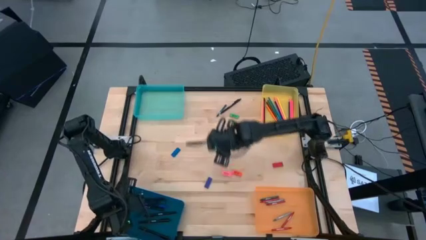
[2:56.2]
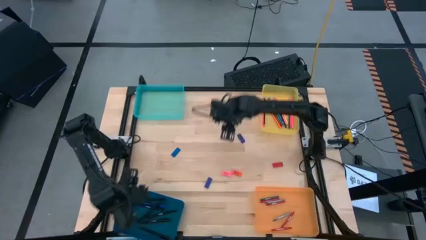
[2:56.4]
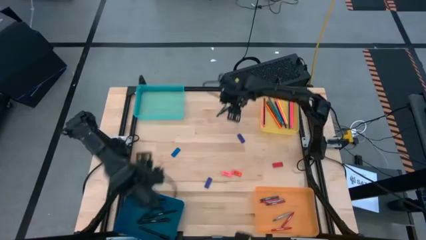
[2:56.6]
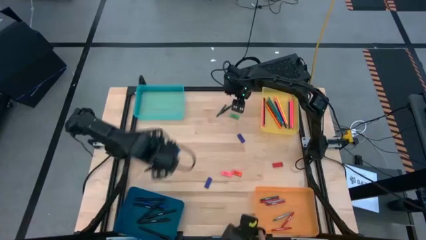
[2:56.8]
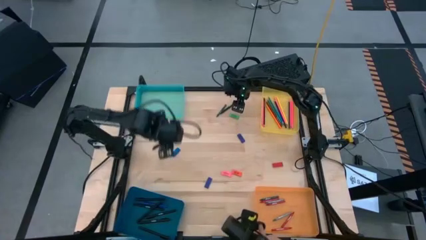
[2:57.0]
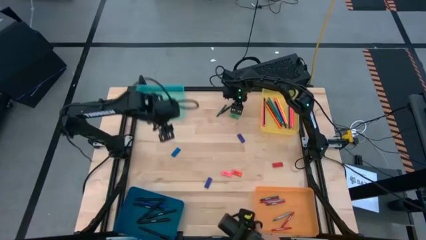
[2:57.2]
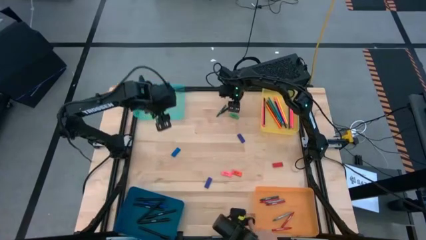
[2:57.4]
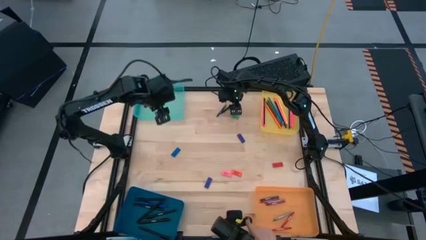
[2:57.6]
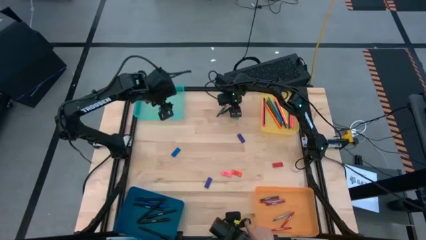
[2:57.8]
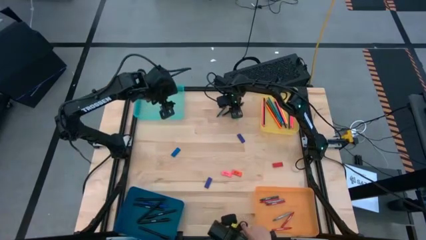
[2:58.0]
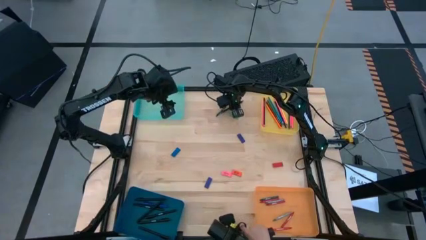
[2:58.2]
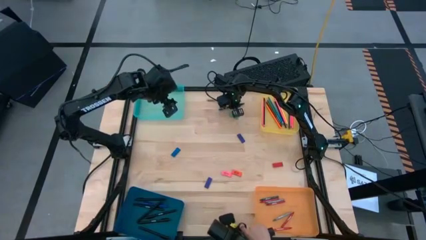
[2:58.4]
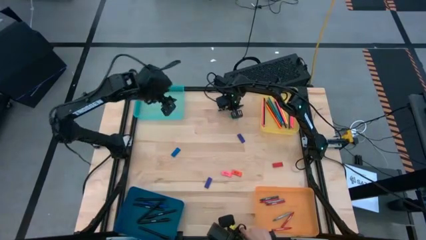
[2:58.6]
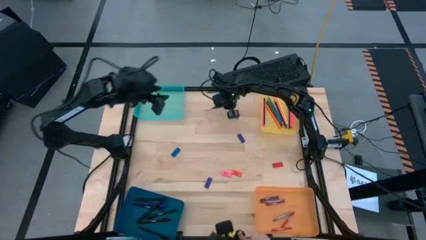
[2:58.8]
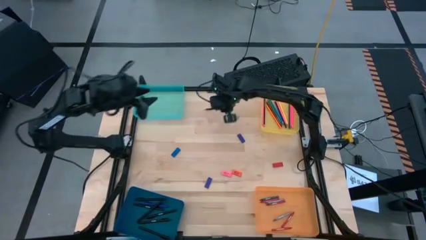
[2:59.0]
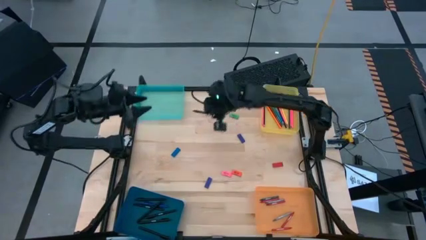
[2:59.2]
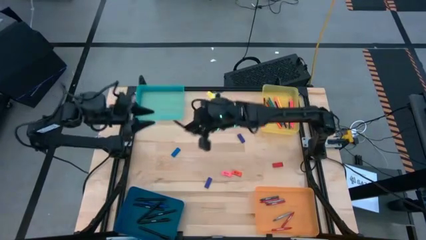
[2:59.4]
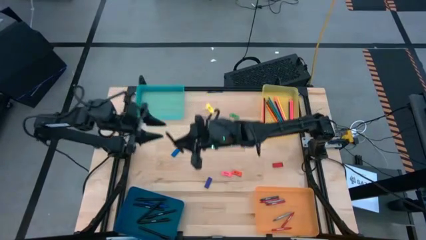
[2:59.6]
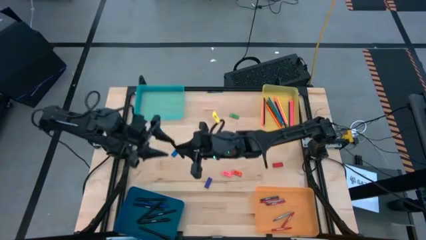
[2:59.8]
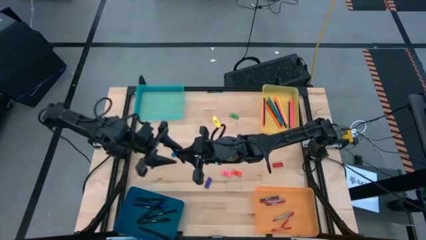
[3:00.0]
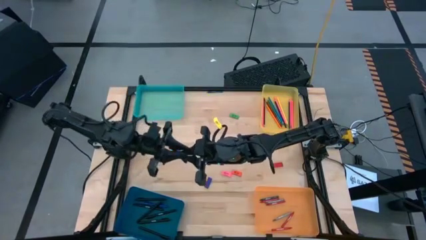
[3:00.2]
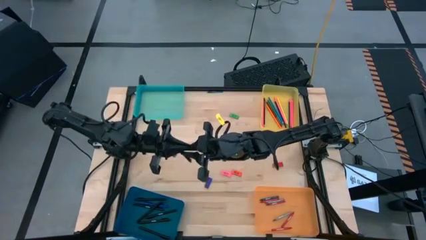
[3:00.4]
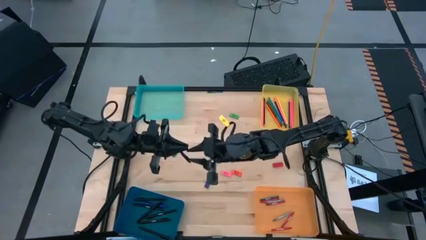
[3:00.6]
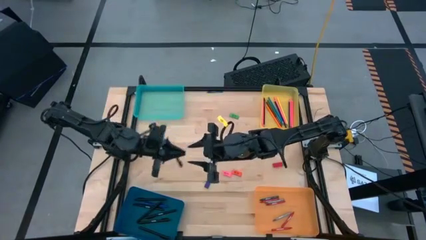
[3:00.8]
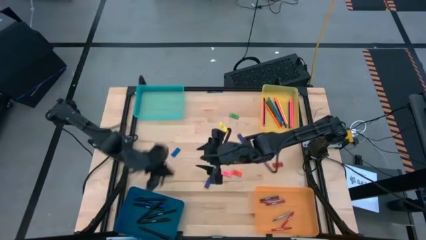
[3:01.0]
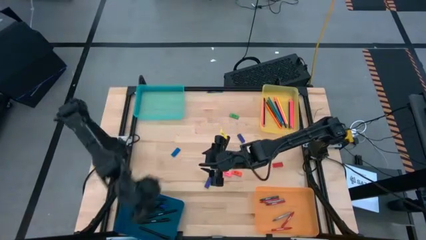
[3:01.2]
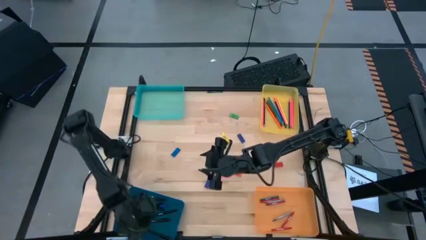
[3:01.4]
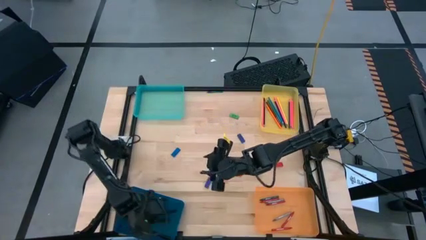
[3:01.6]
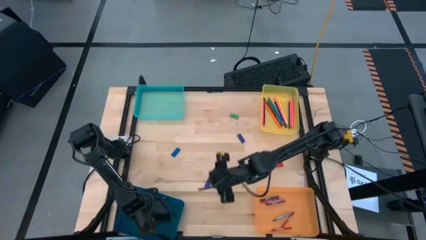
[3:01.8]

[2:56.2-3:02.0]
Task: Sort crayons/erasers/pens/pencils in bins
Put the black pen into the blue bin

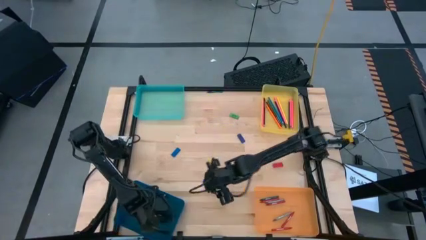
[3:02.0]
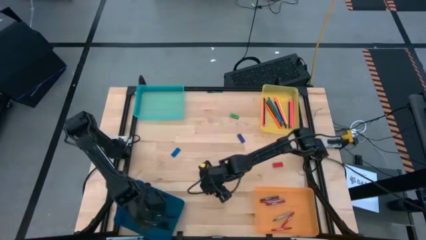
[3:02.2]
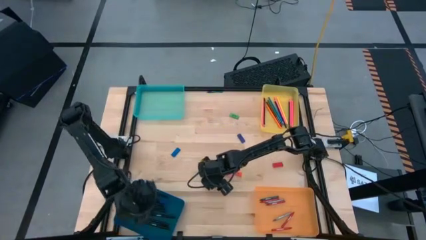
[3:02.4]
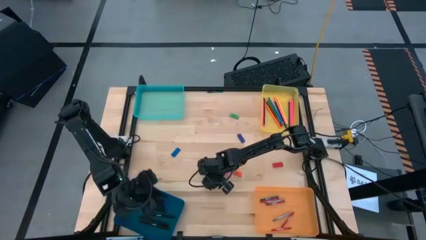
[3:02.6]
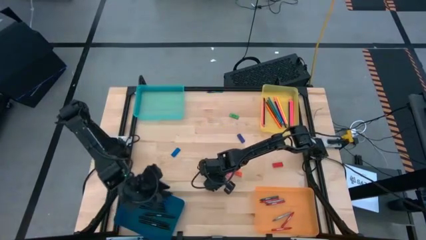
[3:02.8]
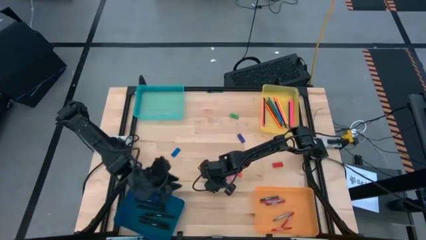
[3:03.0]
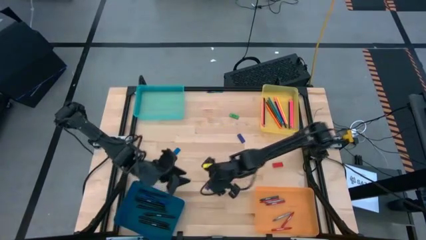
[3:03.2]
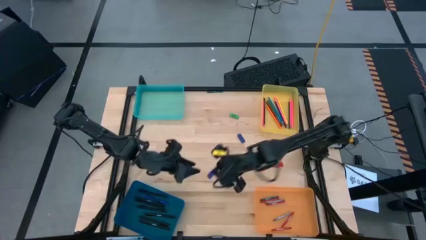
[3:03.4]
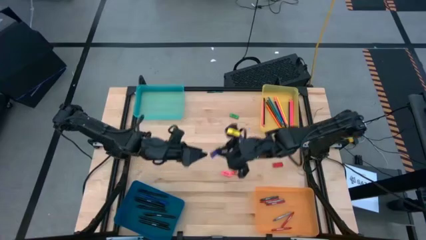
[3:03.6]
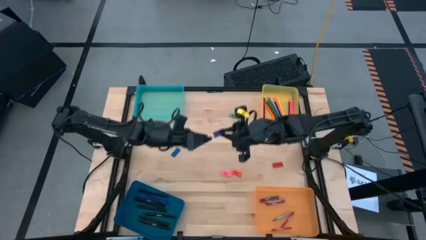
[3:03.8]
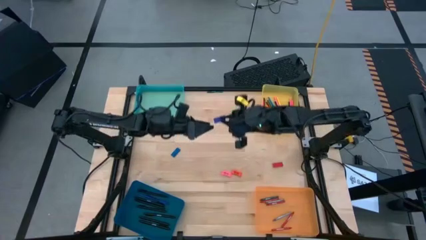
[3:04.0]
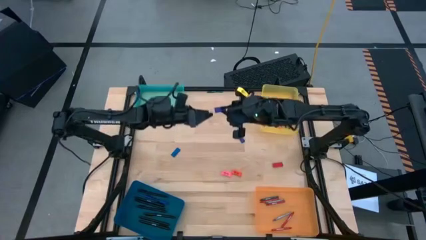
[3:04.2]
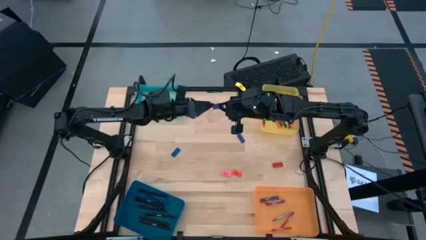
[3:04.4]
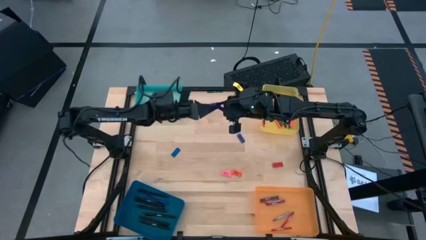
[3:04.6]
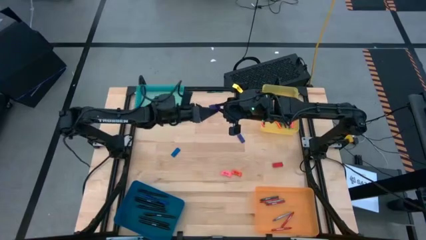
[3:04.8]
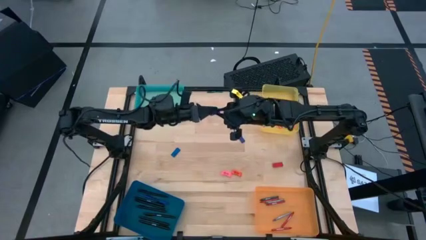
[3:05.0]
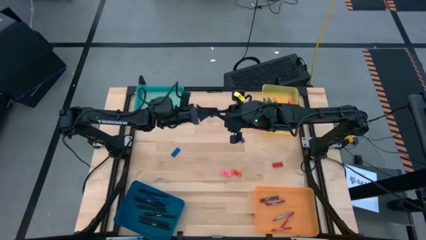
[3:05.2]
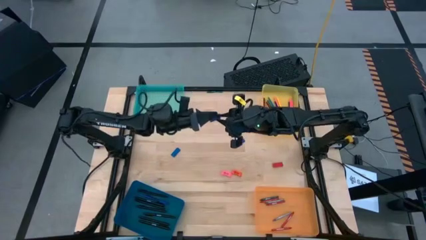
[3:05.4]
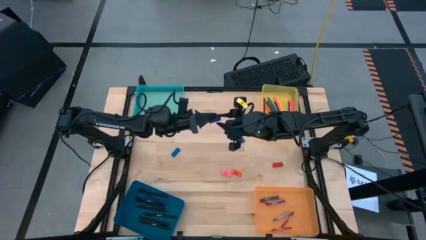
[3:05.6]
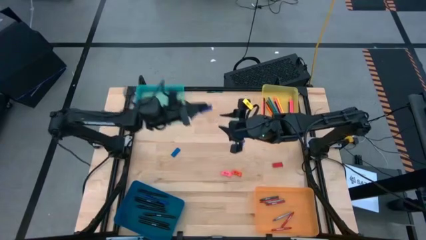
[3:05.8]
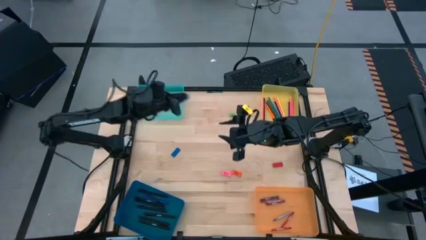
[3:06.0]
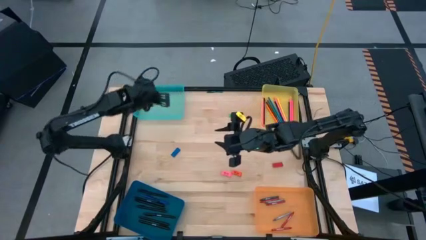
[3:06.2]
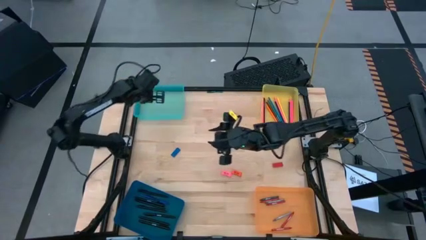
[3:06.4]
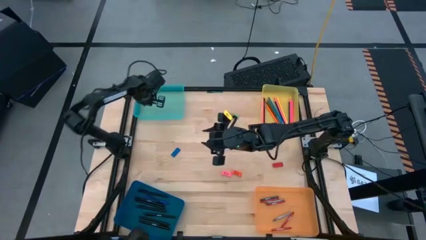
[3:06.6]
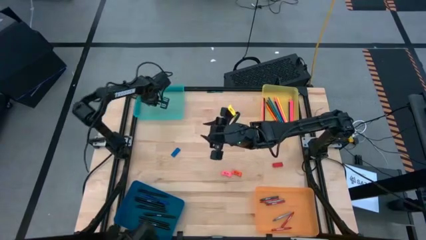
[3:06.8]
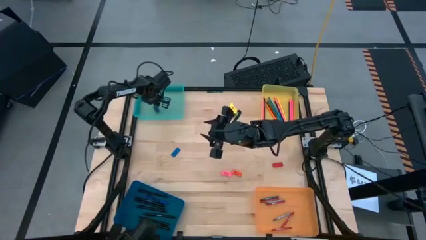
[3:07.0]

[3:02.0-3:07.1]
Put the violet eraser into the light blue bin

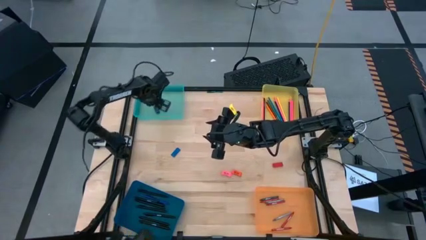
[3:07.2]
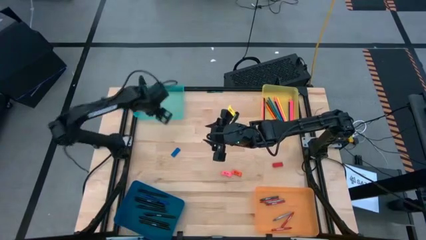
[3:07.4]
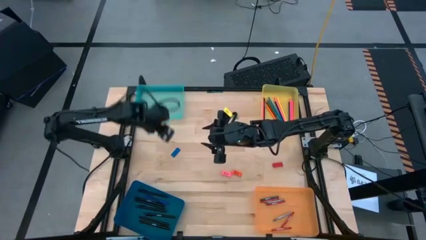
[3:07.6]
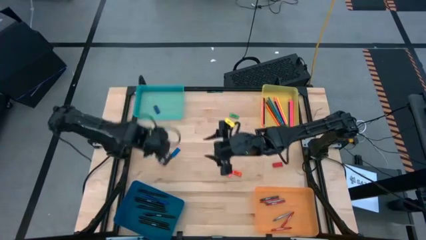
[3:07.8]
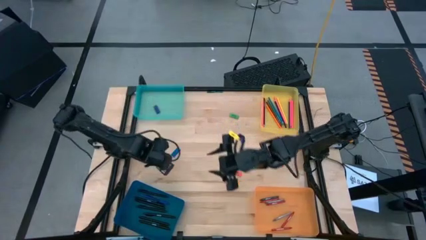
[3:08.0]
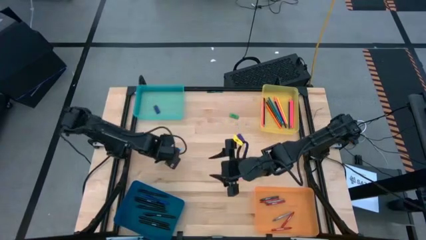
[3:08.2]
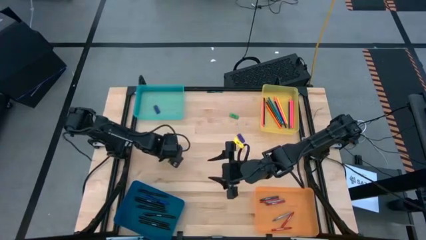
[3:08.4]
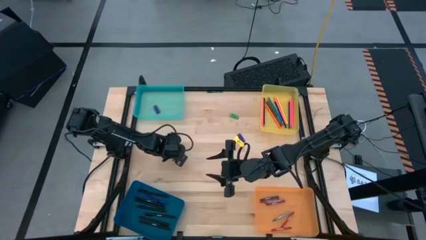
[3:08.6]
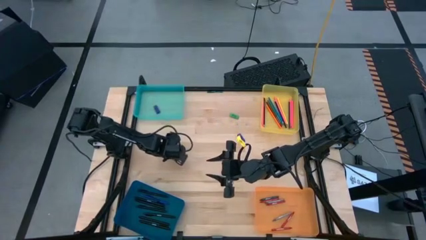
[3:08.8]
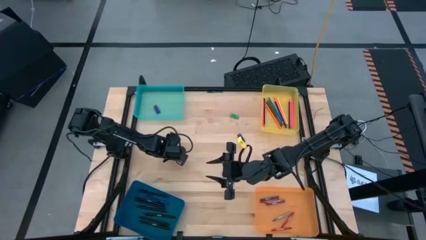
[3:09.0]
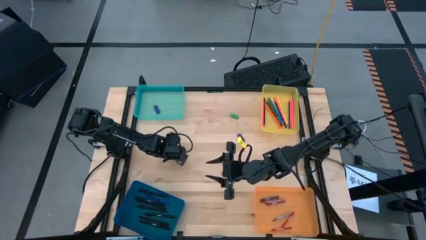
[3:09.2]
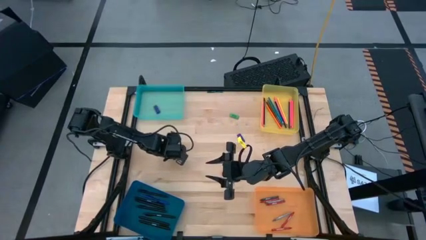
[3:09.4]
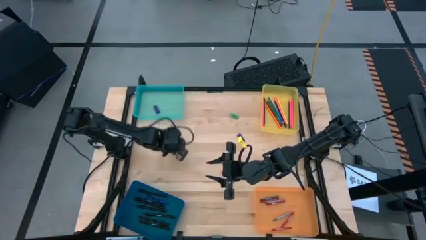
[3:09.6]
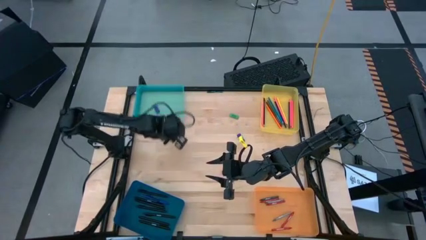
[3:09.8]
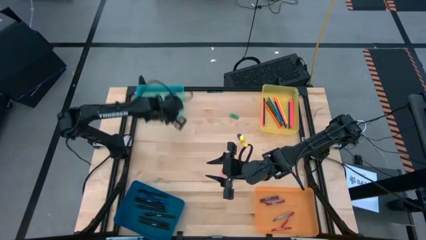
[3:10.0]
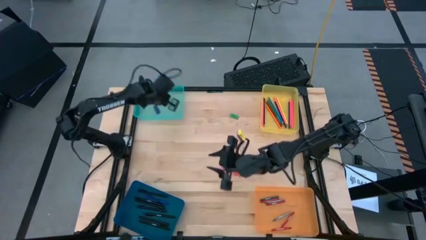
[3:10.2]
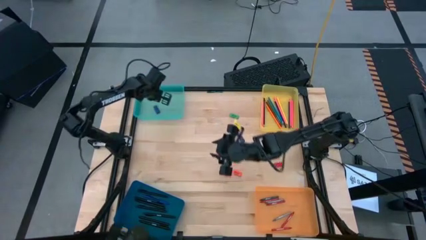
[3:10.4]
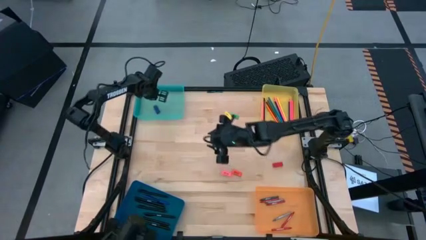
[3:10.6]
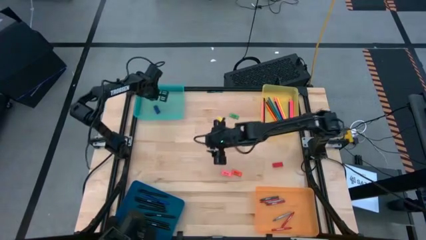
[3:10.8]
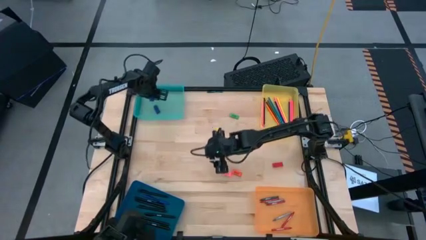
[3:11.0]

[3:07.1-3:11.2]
Put the blue eraser into the light blue bin

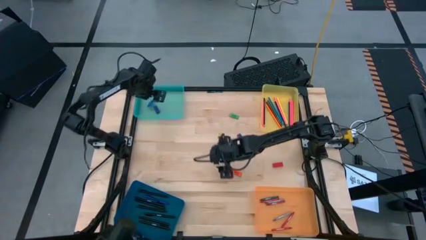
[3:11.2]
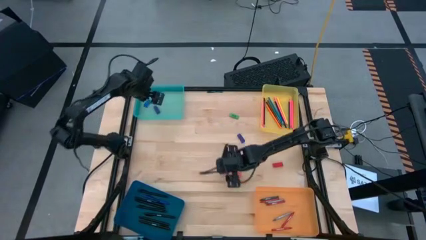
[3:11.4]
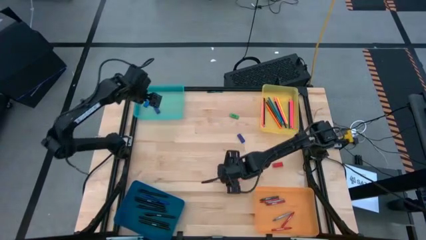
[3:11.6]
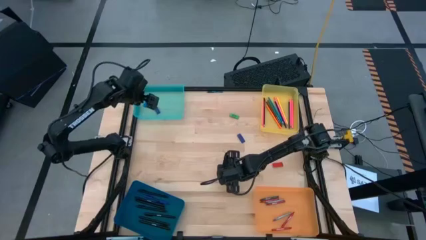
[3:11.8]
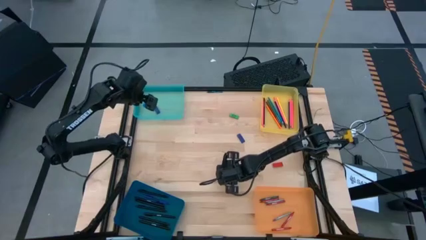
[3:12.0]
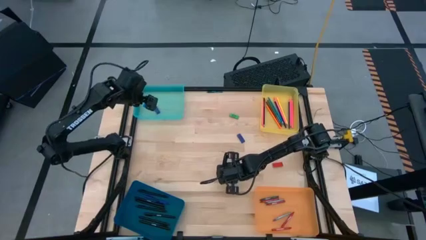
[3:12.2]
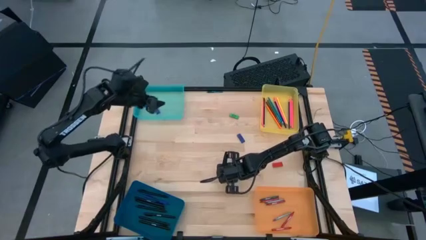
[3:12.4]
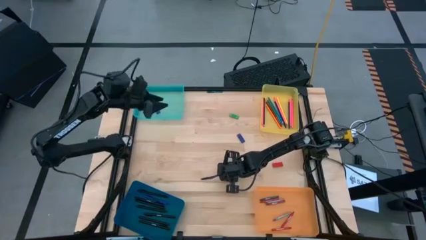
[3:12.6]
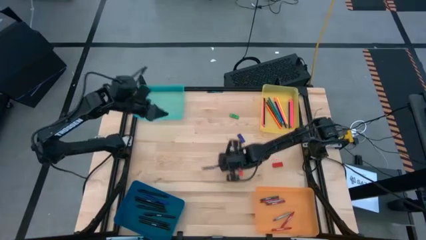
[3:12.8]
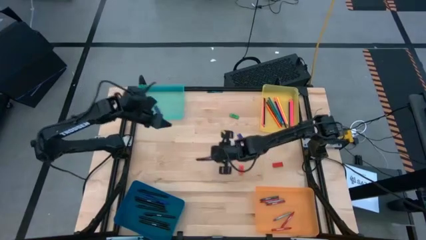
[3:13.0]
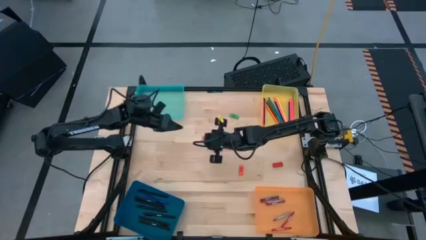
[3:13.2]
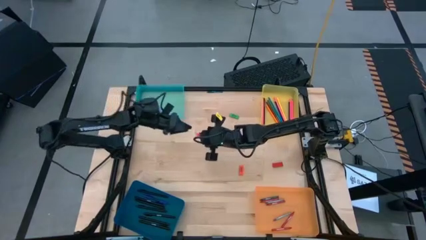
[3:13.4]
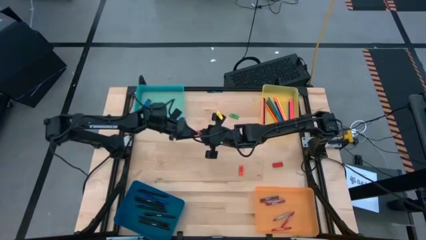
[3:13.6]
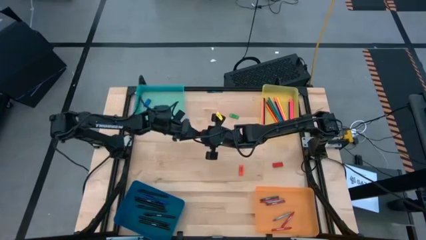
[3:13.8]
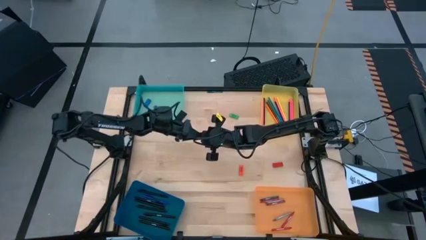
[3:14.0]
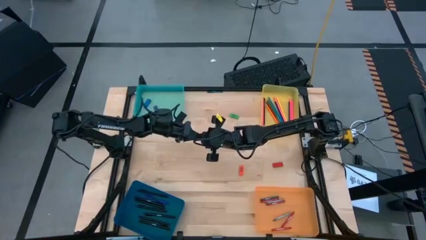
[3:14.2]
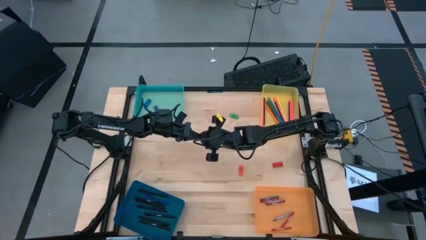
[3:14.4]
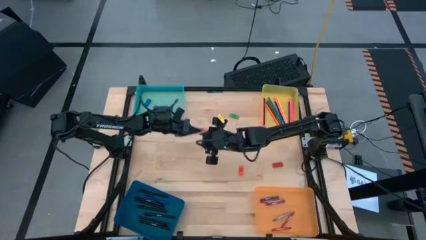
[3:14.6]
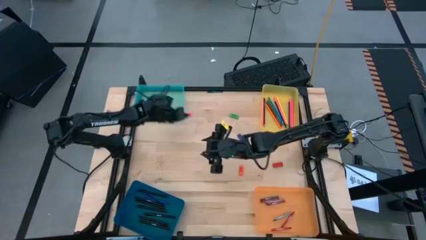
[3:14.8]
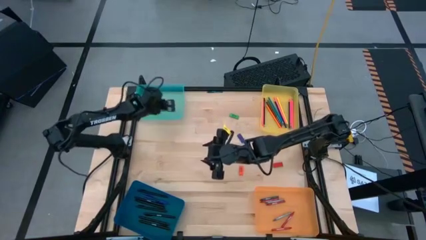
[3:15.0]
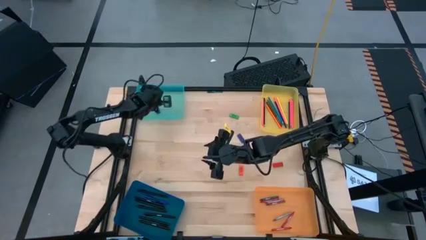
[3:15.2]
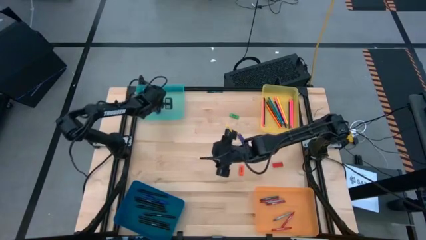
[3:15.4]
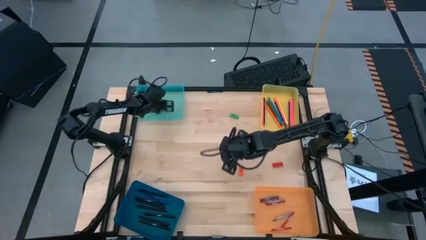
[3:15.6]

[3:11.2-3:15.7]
Put the pink eraser into the light blue bin
